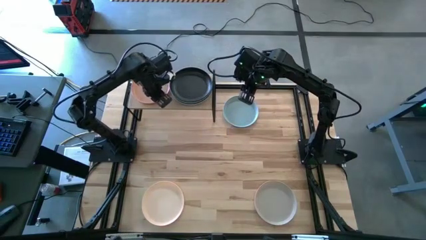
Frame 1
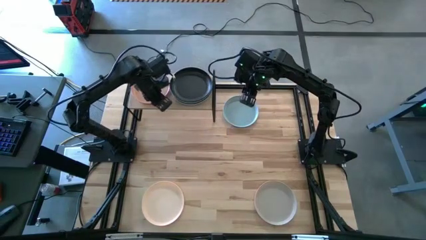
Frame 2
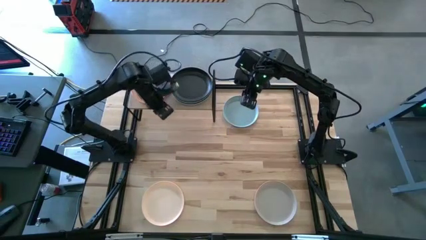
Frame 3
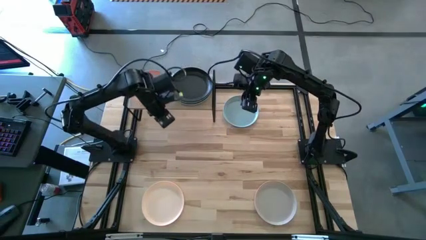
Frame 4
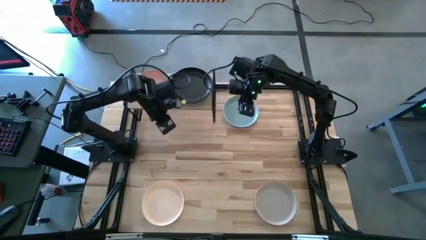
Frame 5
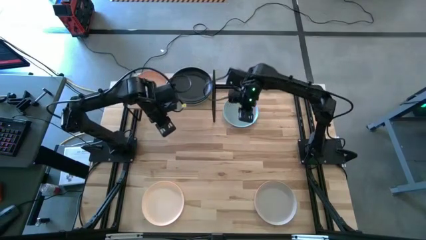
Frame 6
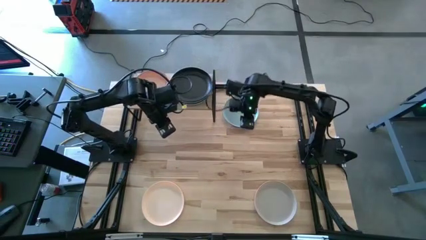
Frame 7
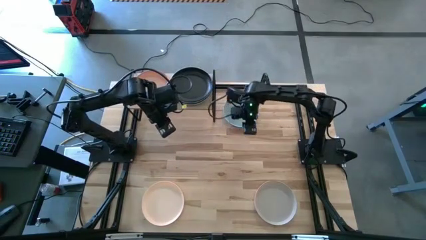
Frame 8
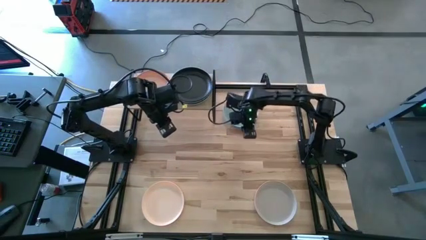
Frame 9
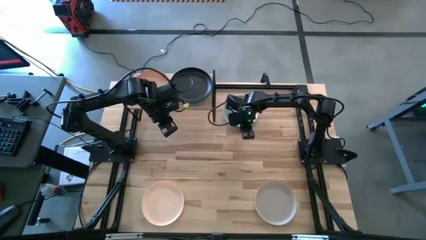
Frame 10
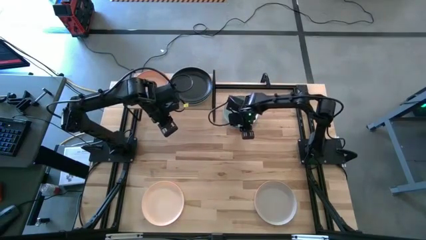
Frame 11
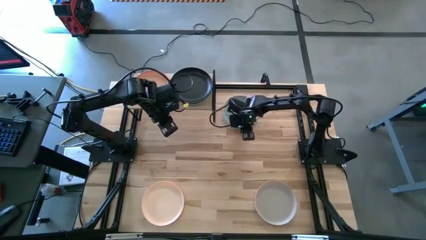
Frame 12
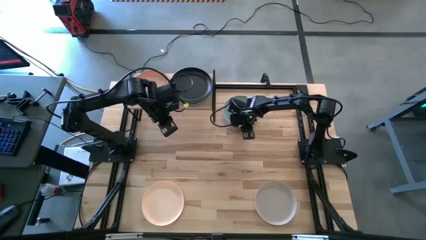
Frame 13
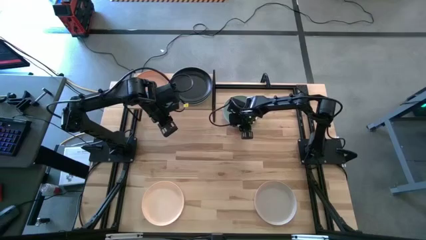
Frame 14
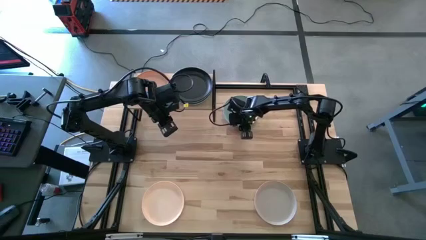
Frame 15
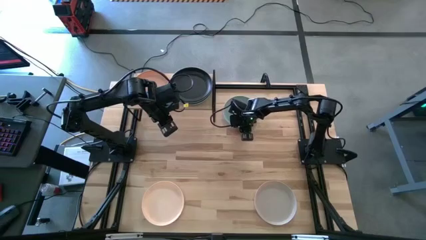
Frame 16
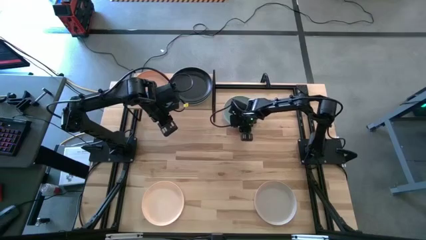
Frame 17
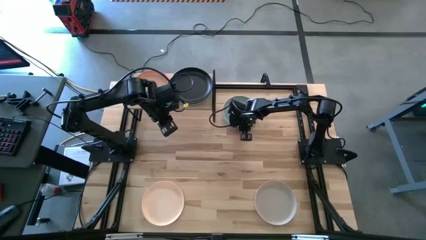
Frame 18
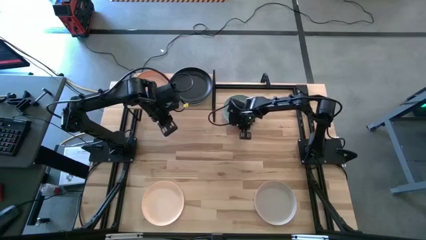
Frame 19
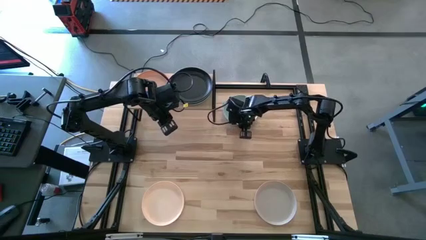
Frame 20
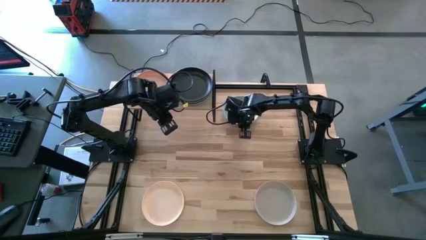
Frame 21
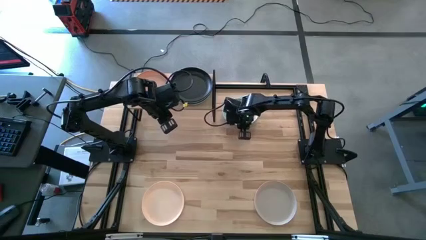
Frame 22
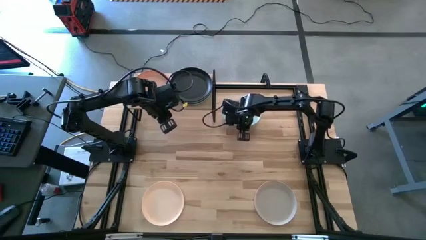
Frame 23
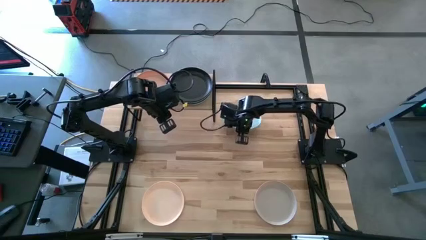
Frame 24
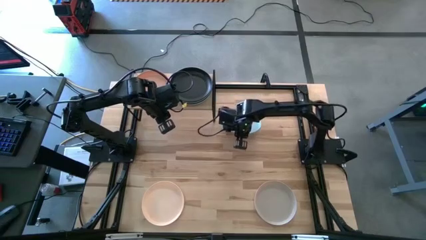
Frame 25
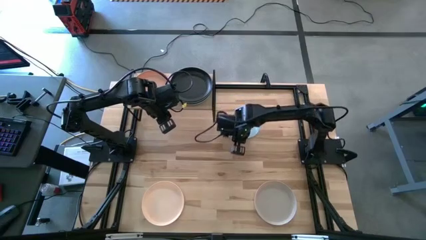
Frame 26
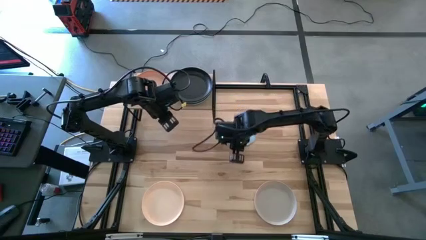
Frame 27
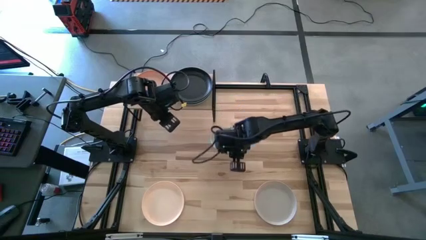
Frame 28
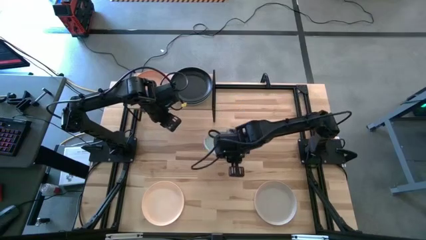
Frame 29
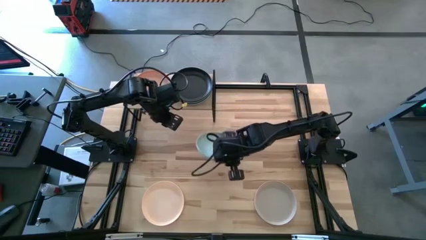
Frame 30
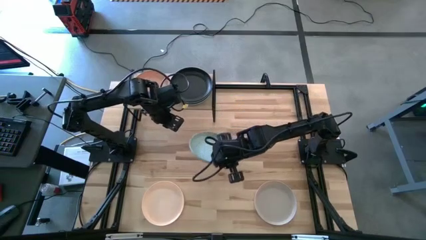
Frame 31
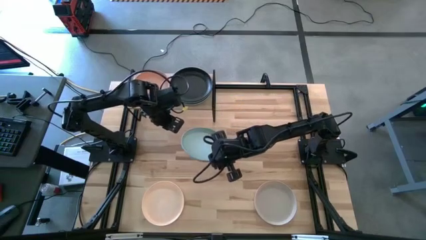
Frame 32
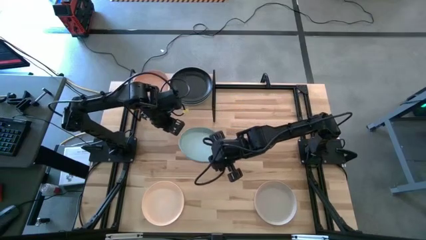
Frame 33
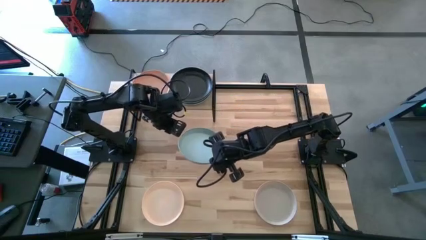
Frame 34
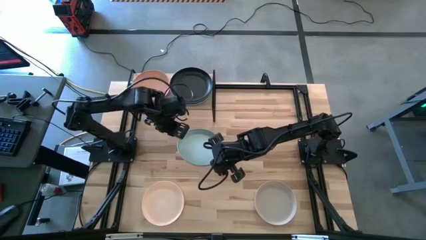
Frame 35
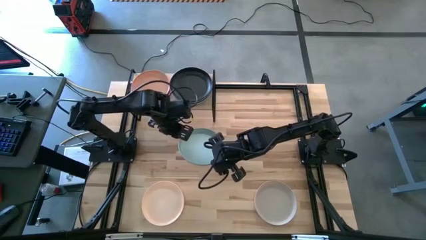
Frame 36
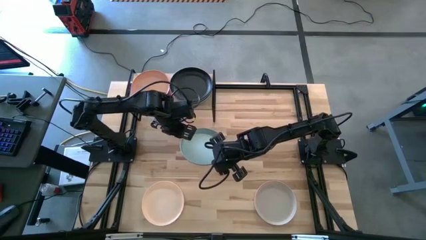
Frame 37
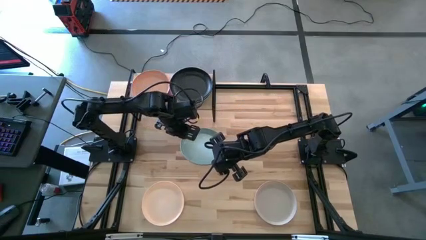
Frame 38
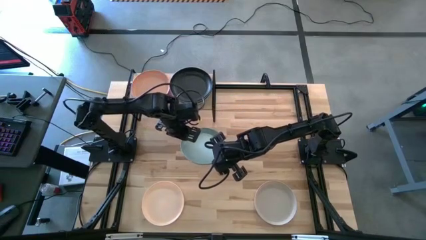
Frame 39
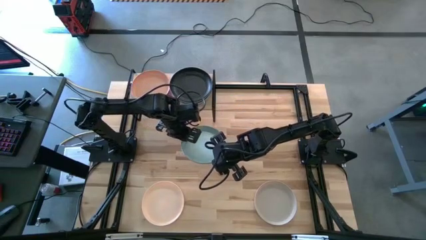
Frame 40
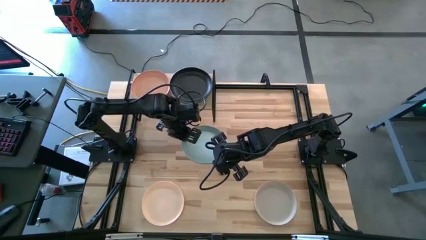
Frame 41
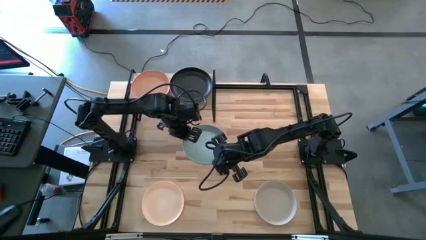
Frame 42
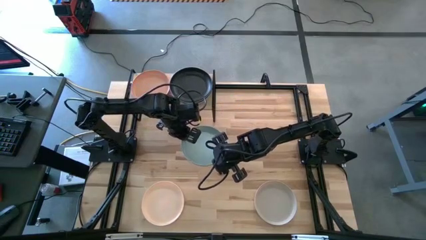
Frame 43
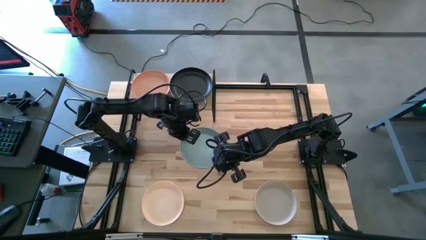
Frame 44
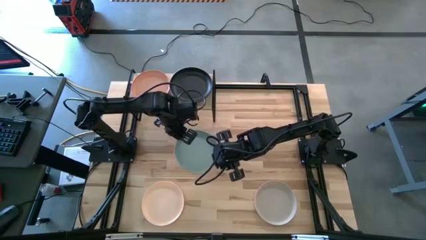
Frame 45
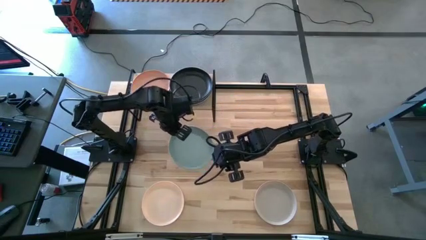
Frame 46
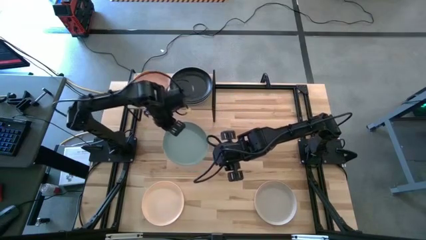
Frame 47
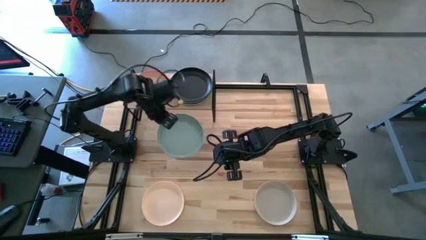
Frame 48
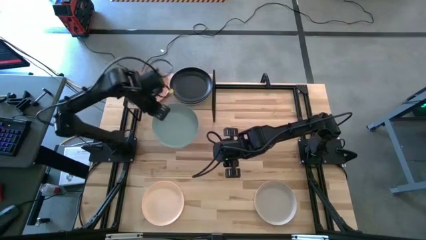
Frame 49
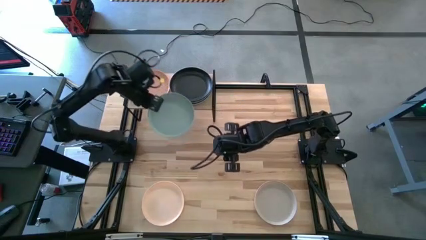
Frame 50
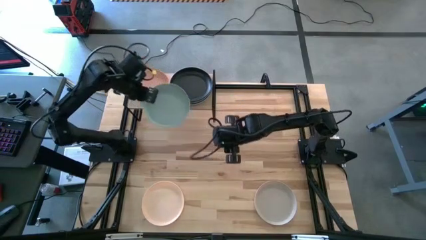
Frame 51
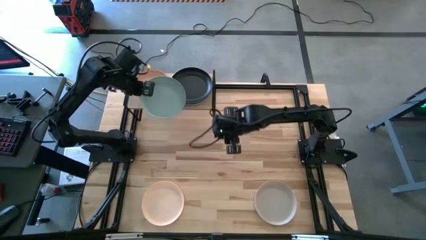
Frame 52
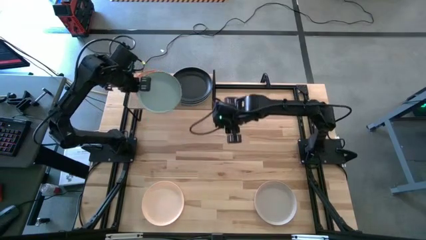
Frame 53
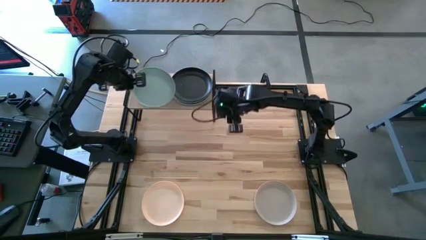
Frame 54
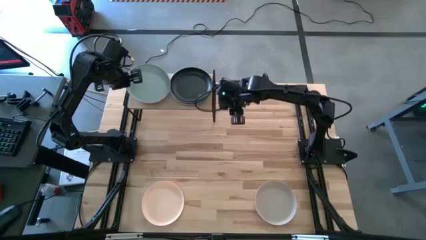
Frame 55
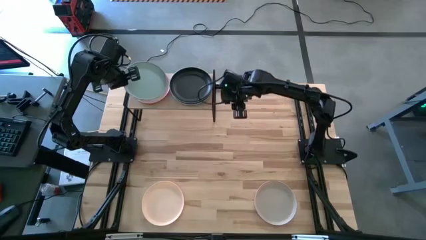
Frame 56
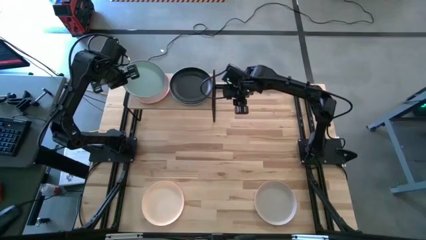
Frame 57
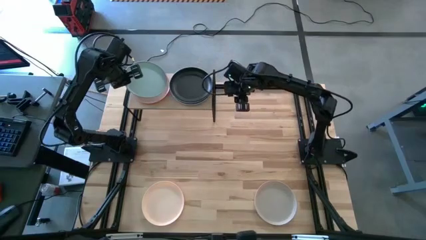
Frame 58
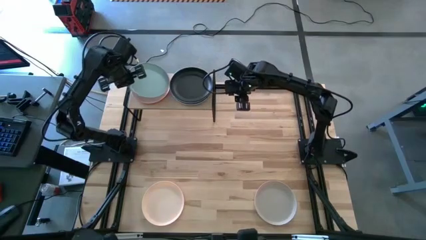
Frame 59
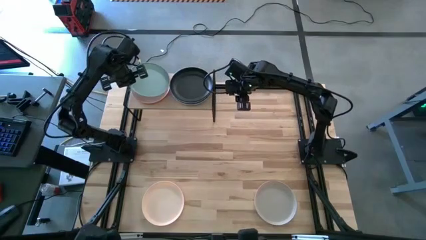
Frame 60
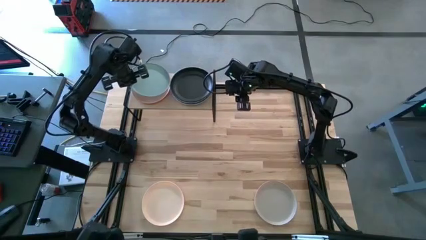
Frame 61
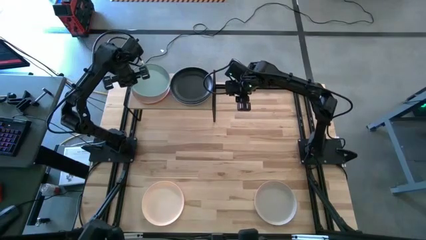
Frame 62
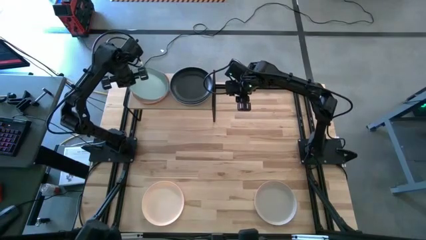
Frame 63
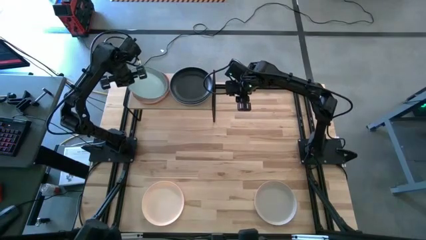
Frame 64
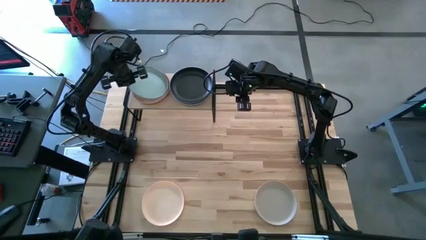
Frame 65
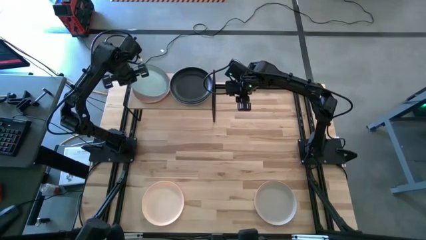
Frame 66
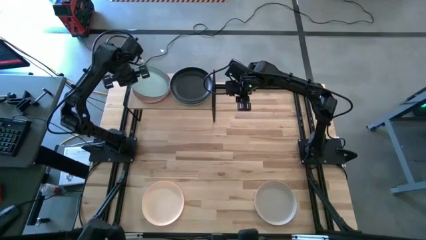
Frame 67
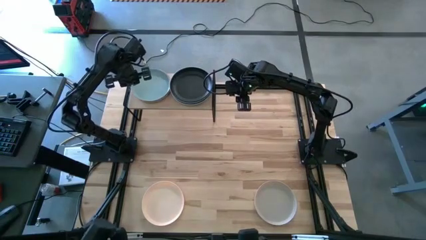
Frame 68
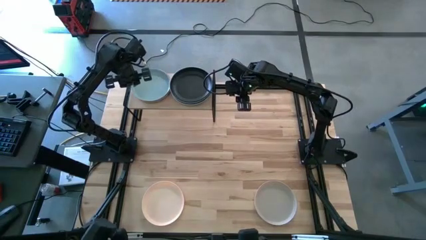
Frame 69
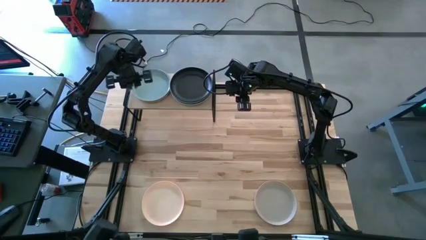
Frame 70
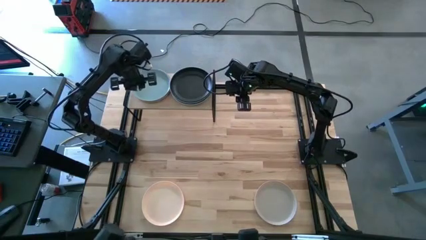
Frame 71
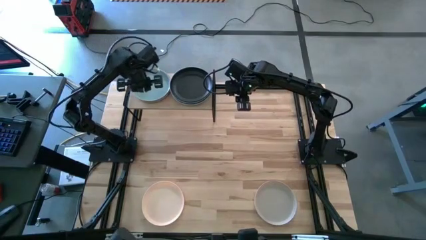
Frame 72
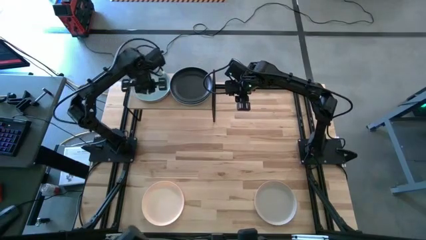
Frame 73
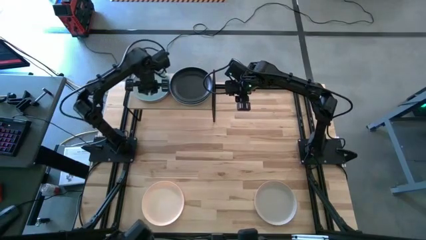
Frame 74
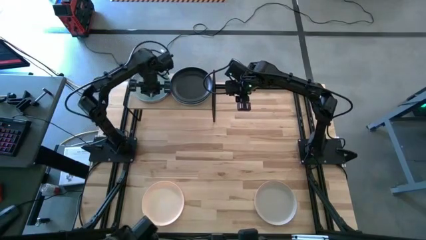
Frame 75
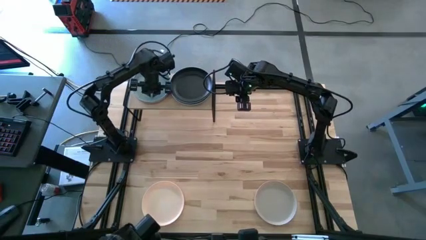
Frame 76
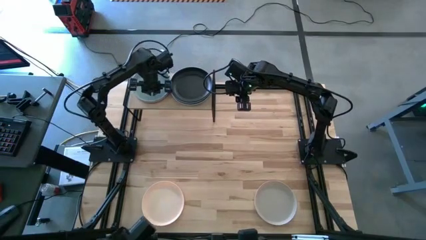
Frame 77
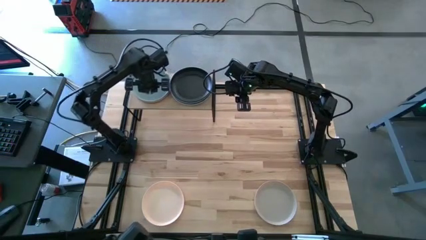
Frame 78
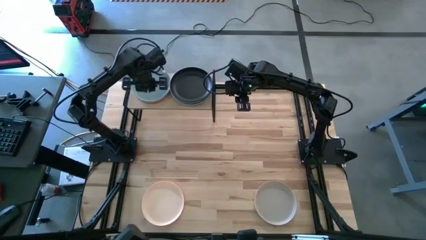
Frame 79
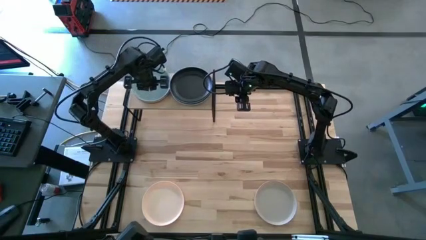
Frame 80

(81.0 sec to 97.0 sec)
Task: Place and stack plates onto a shelf
Stack the light blue plate on top of the brown plate on the shelf

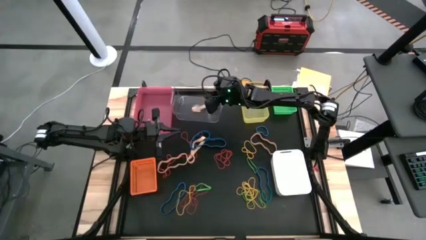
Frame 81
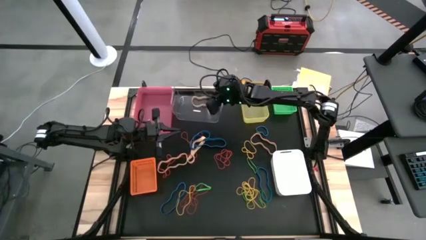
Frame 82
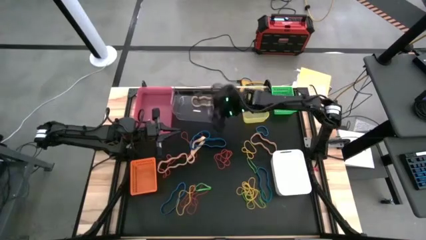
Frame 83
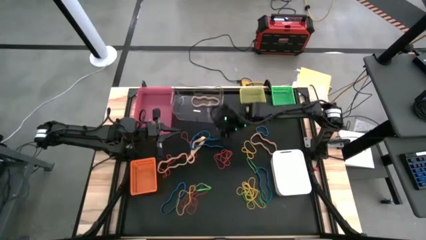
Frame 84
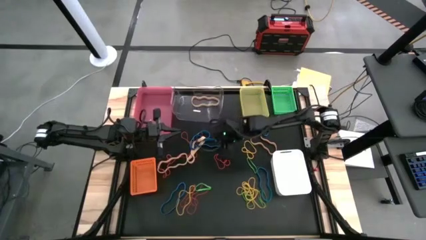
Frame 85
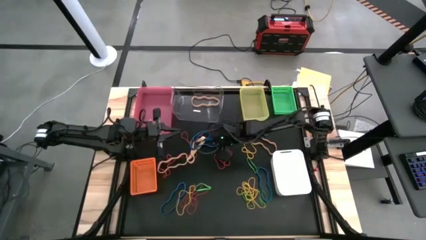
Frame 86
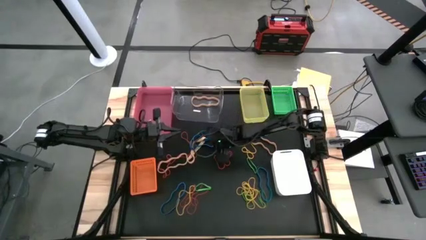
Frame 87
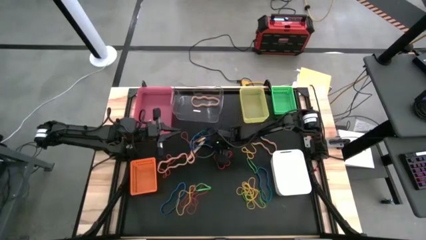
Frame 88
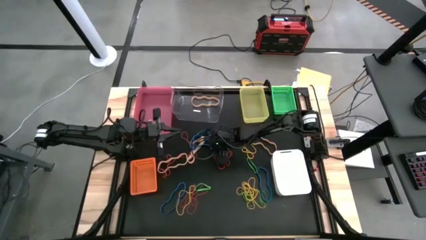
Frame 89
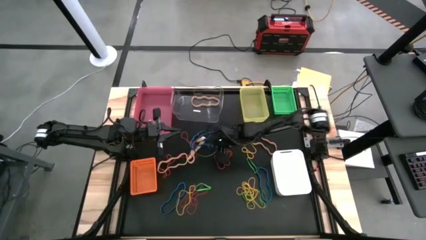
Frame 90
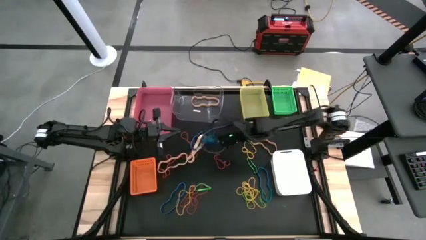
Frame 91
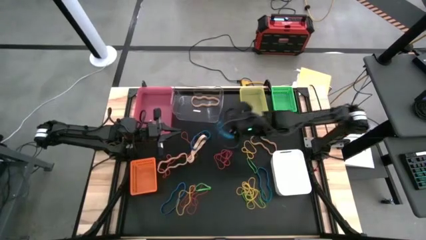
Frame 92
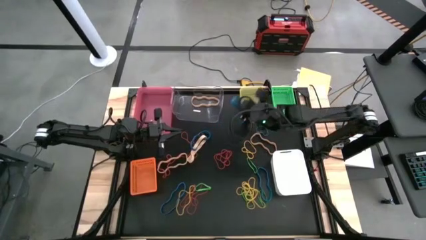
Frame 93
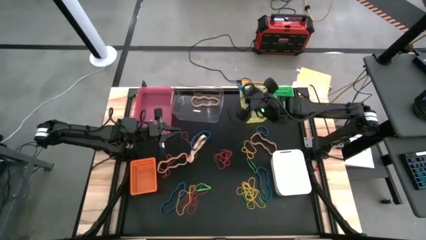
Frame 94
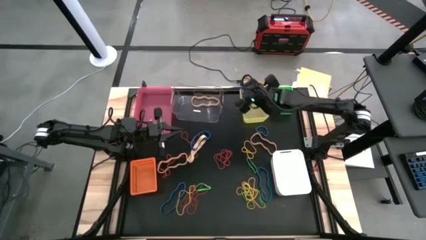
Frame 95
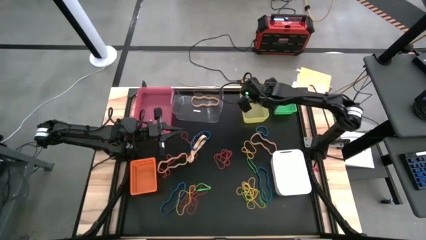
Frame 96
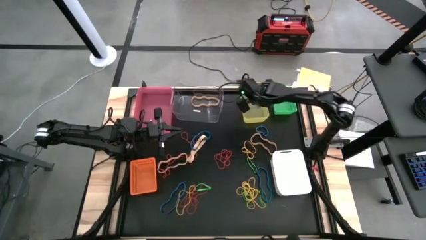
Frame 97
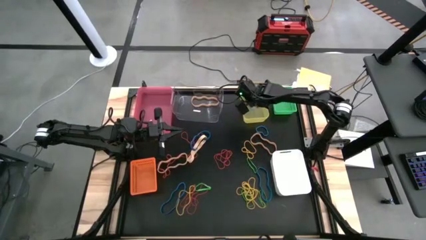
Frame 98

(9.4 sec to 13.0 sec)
Task: Sort rubber bands into baskets
Put the blue rubber band into the yellow bin
